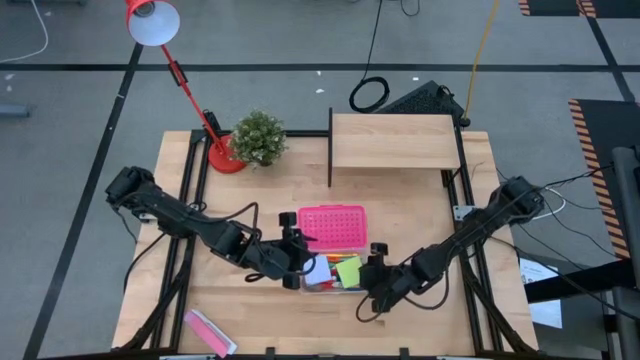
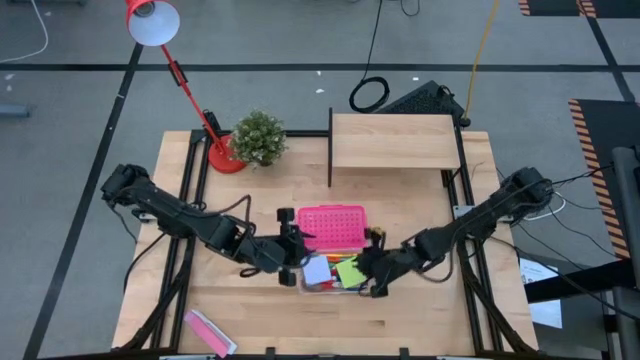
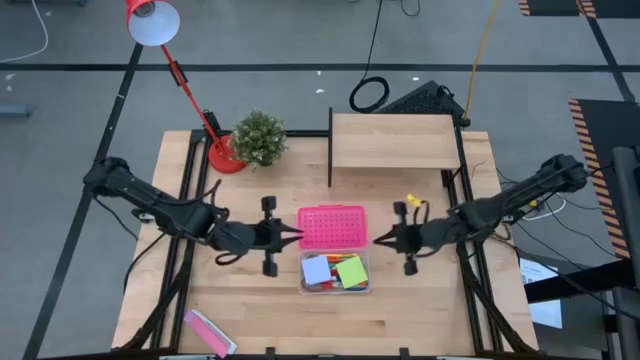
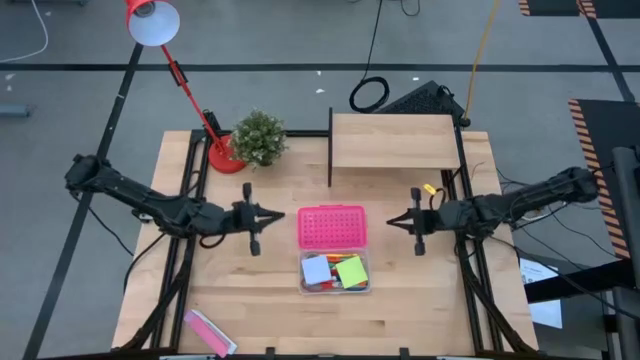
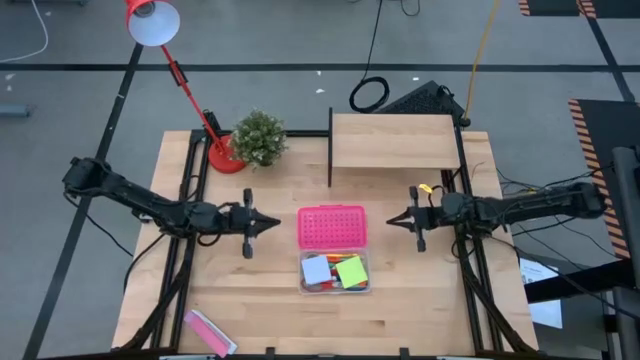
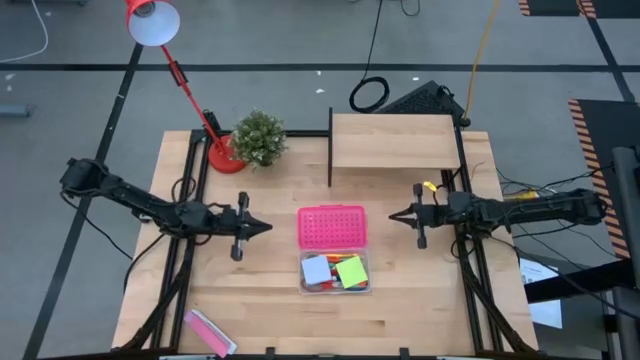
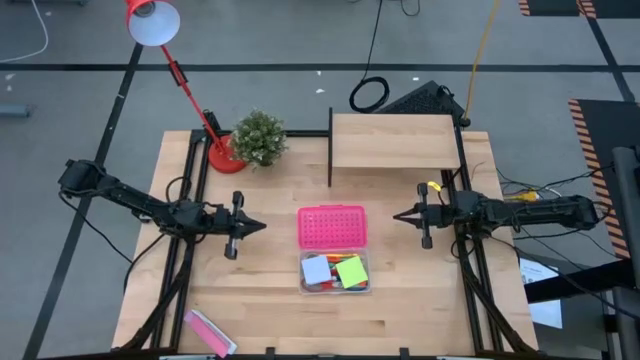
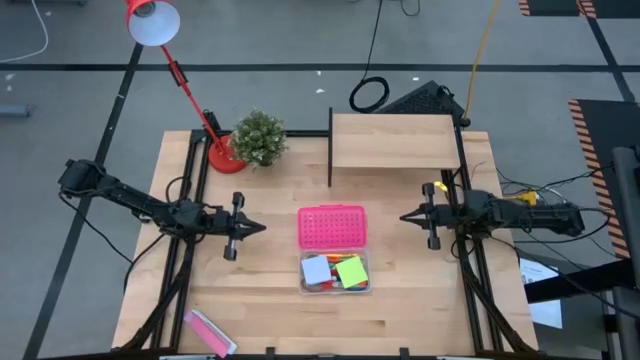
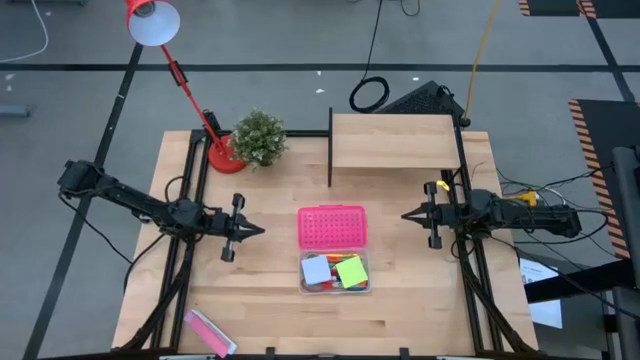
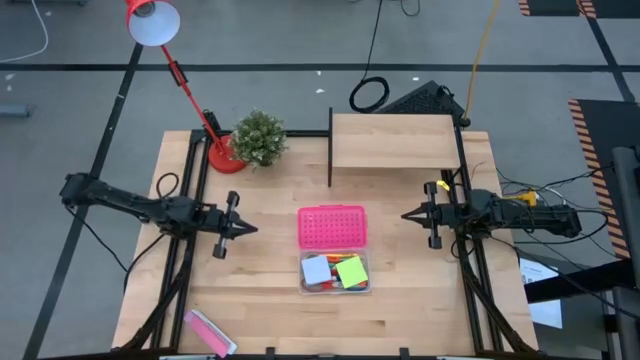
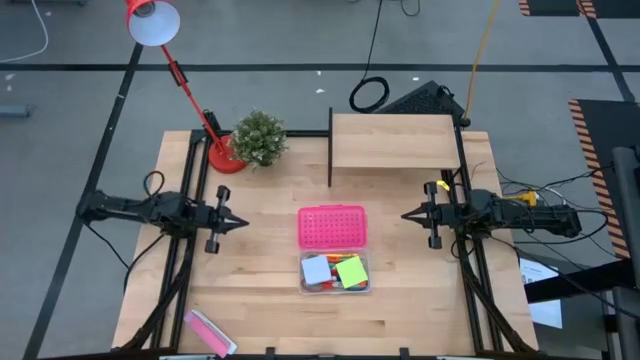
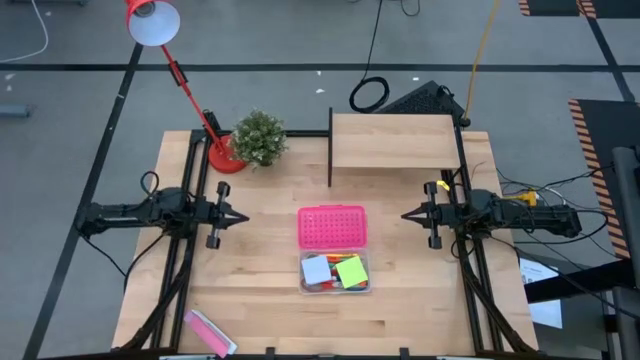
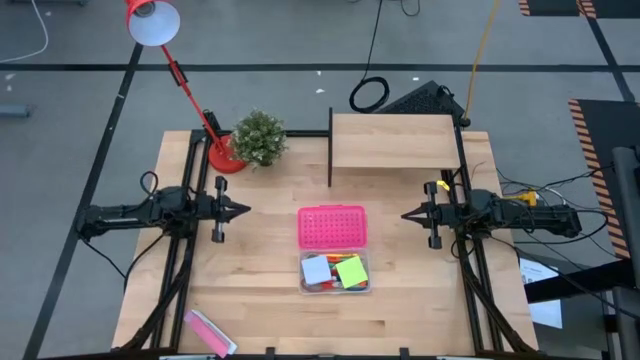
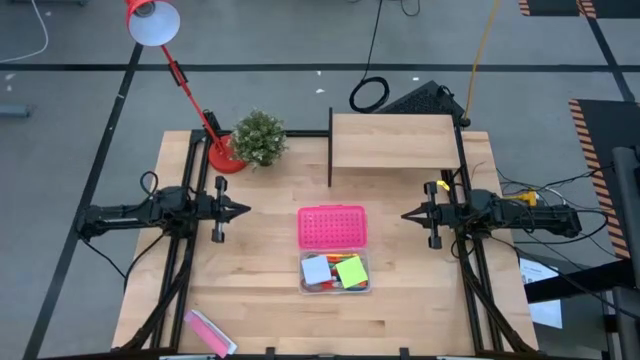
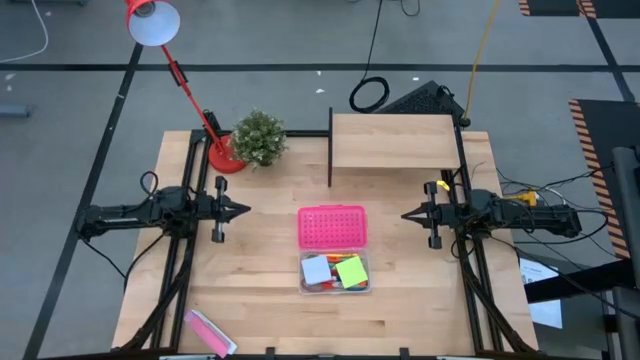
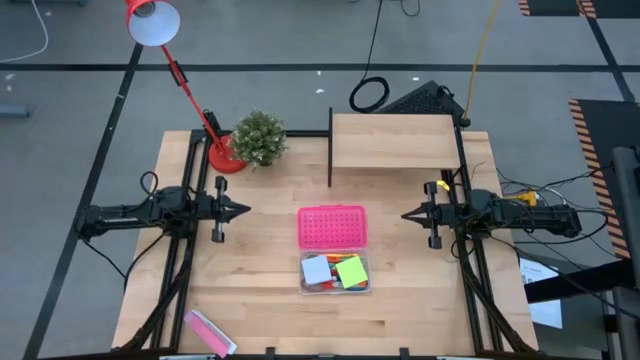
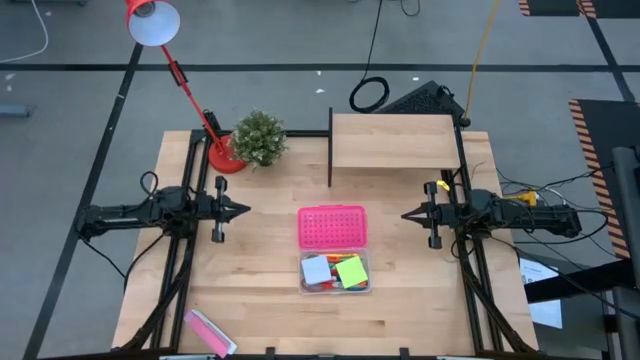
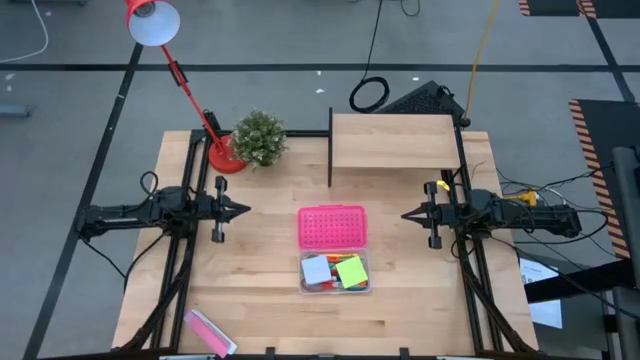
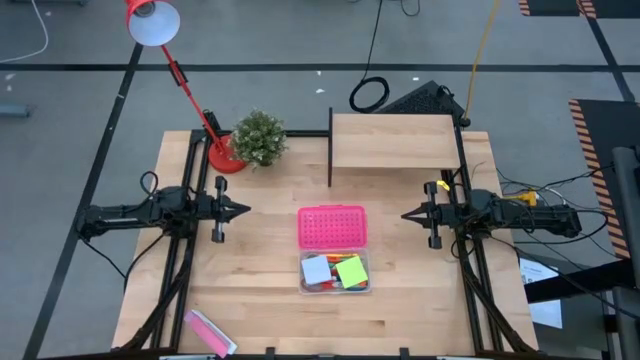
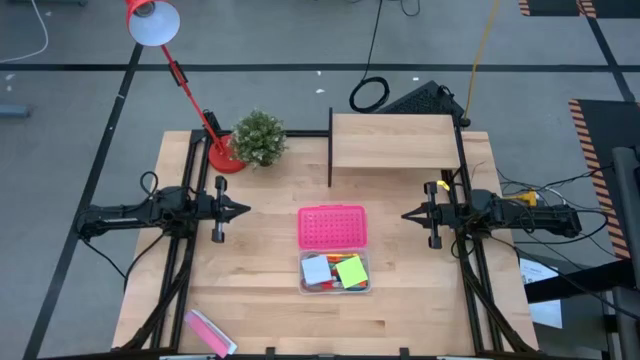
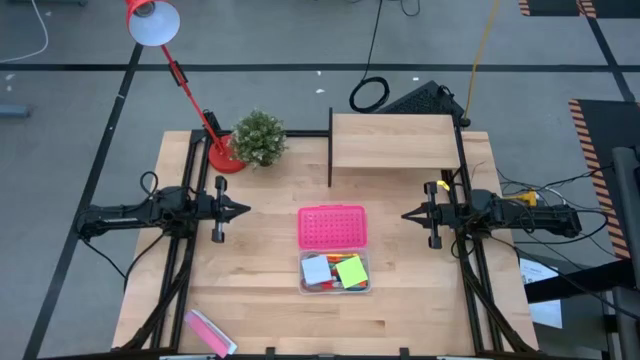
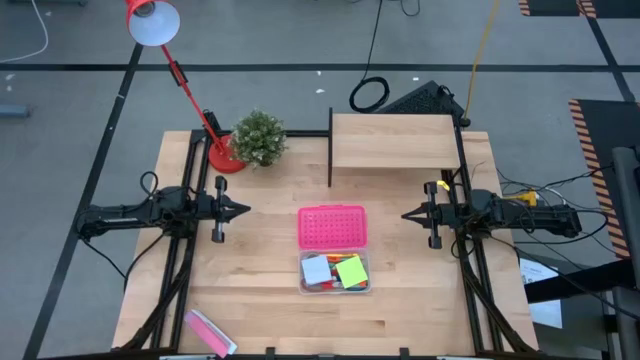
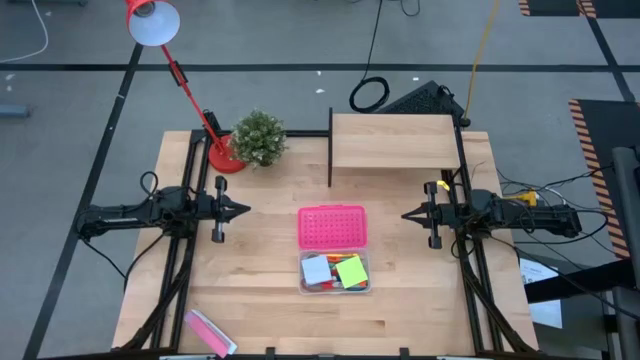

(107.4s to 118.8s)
Task: Pack school essentials
Return to Home Position

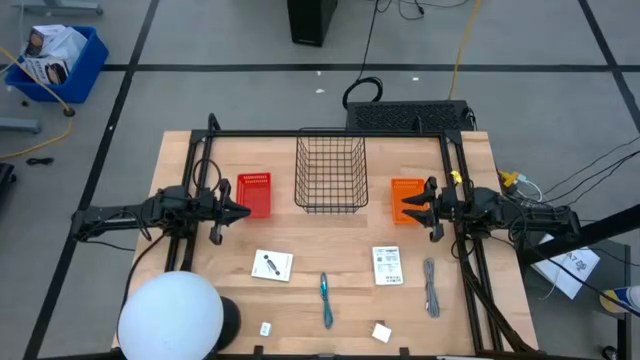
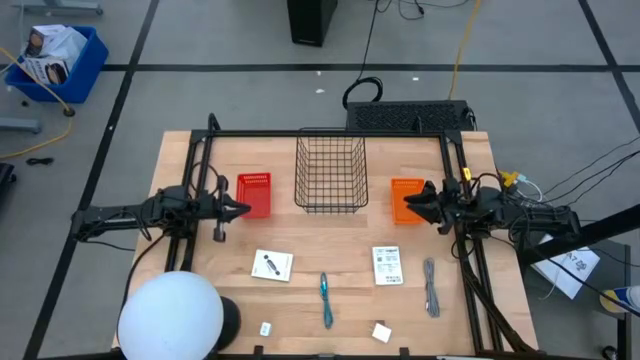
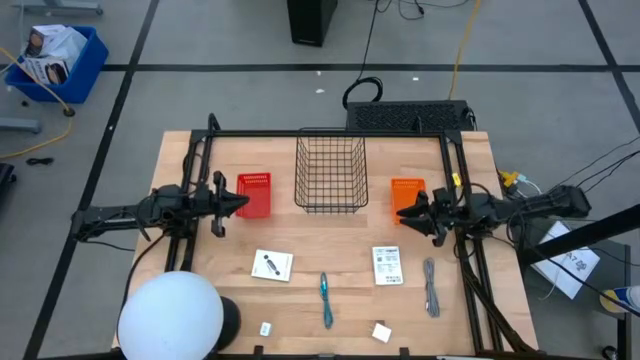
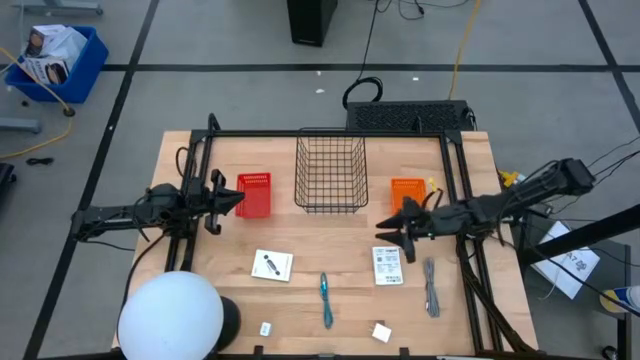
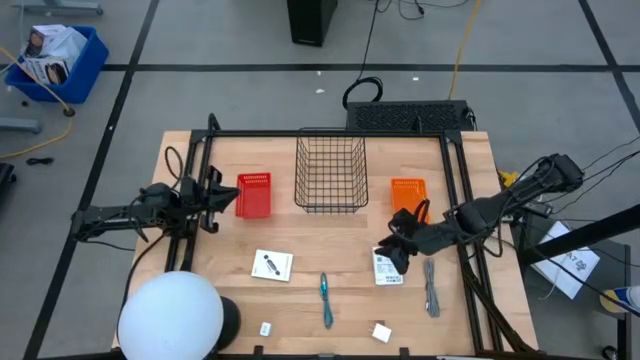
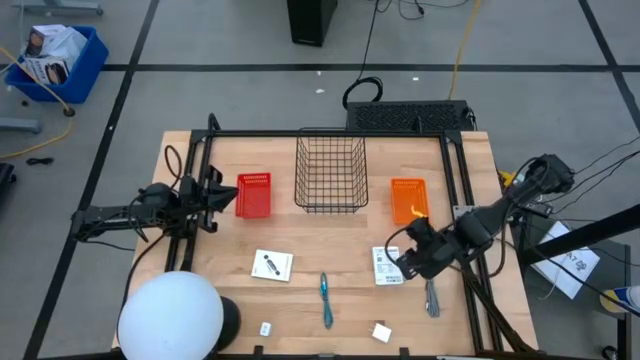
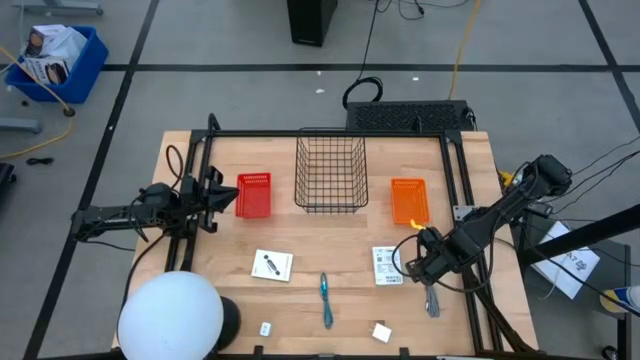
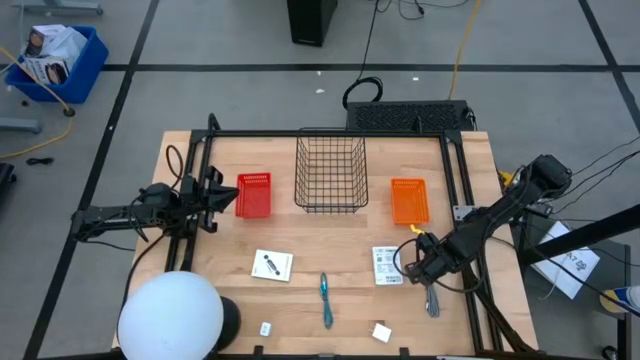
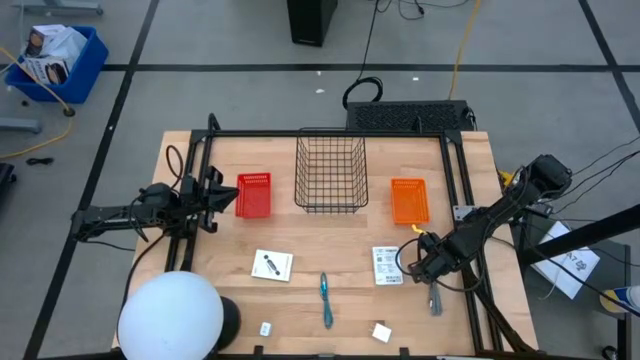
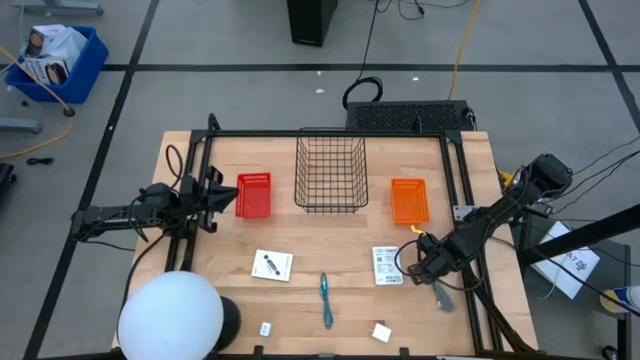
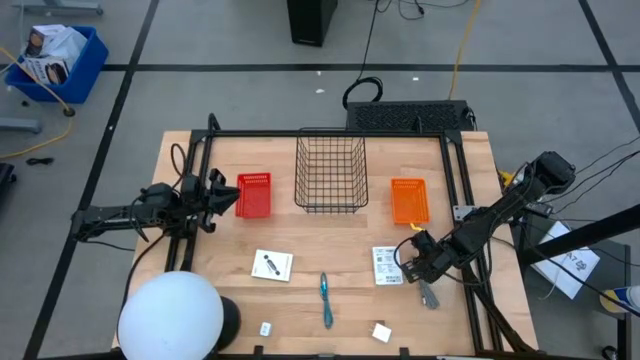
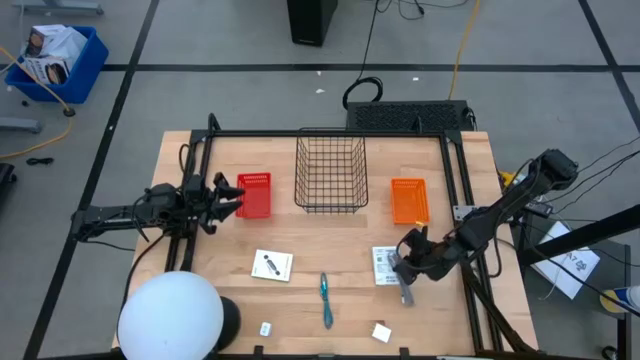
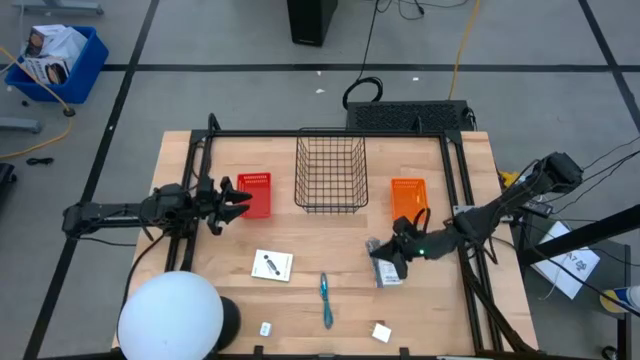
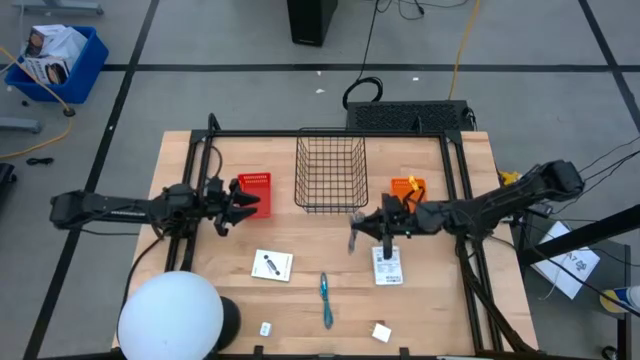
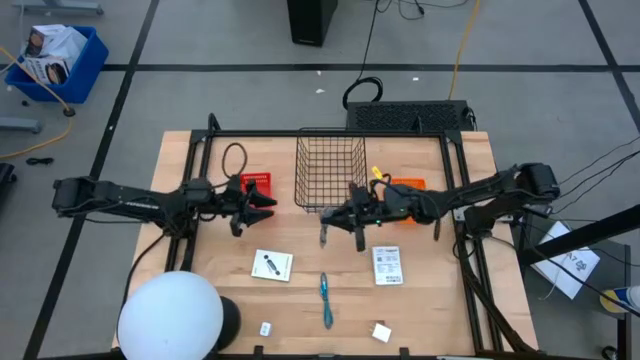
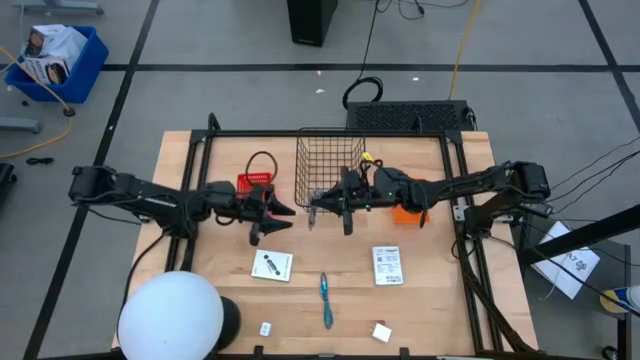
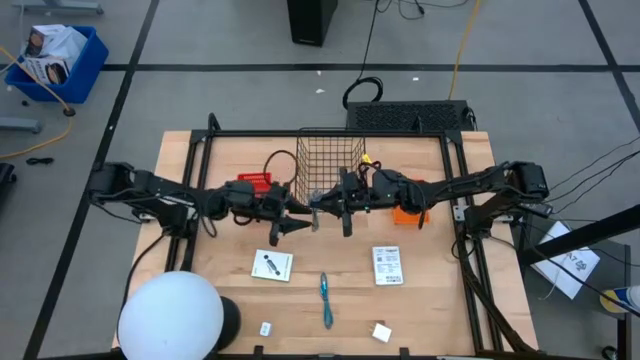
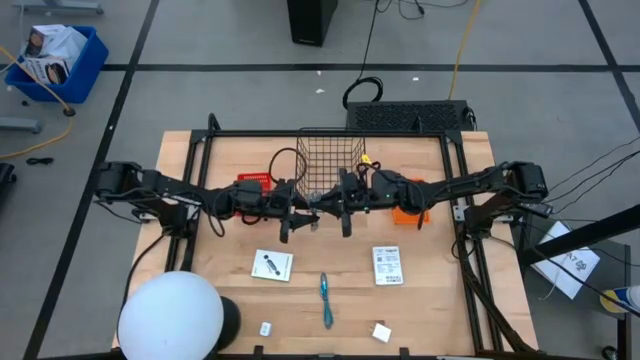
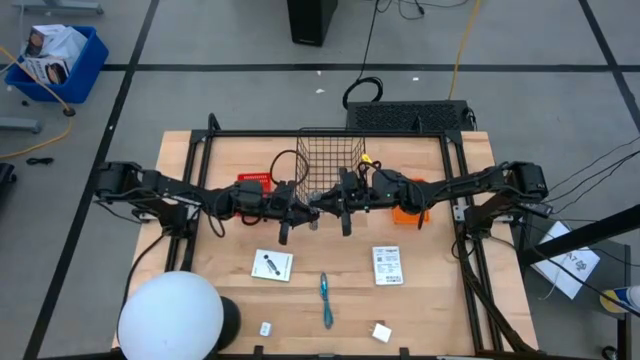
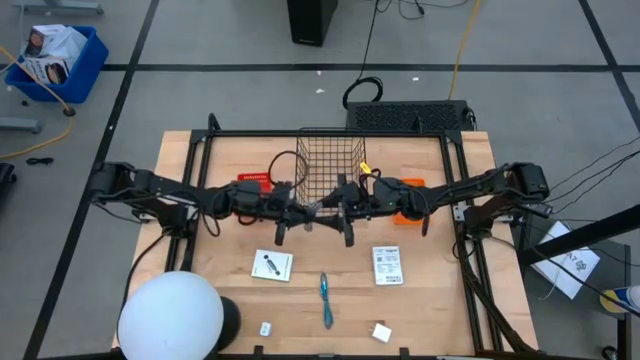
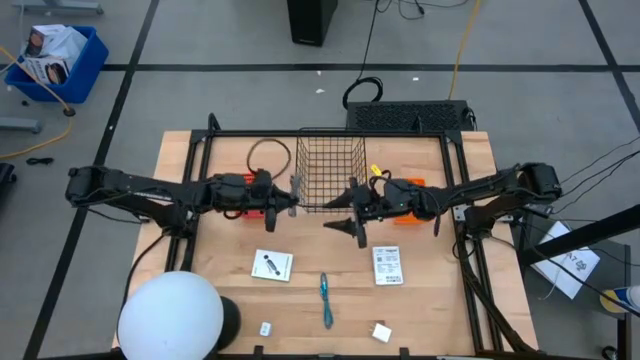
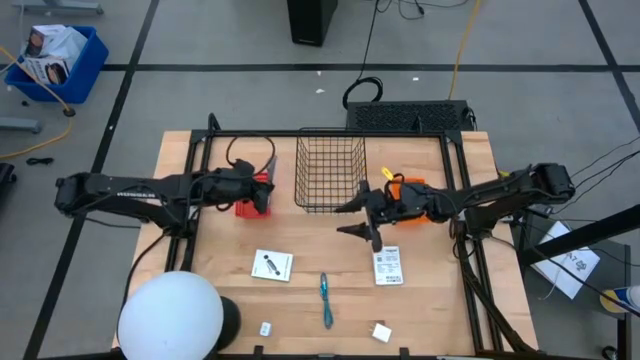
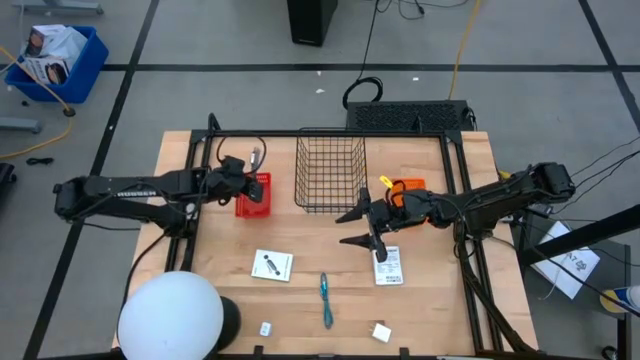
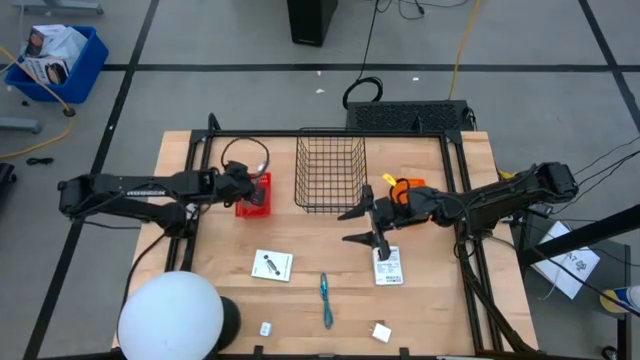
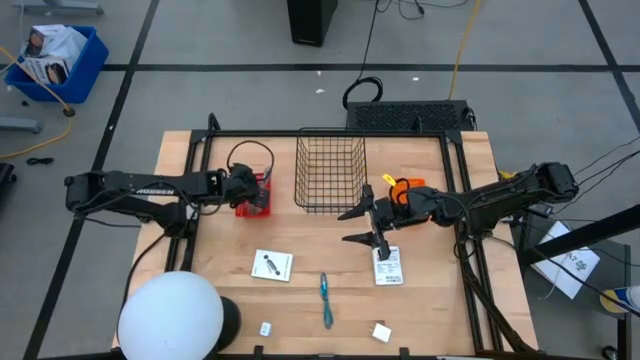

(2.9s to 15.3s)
Task: Pick and place items into bin
Put the black charger cable into the red basket
